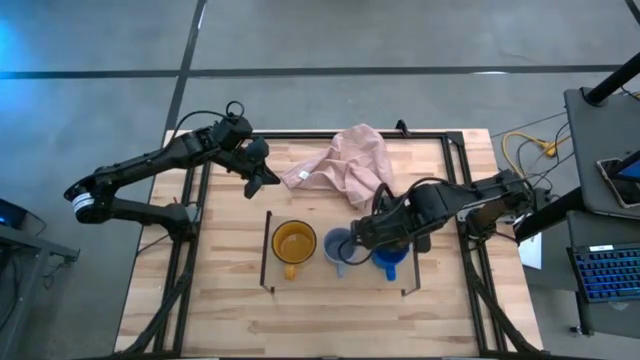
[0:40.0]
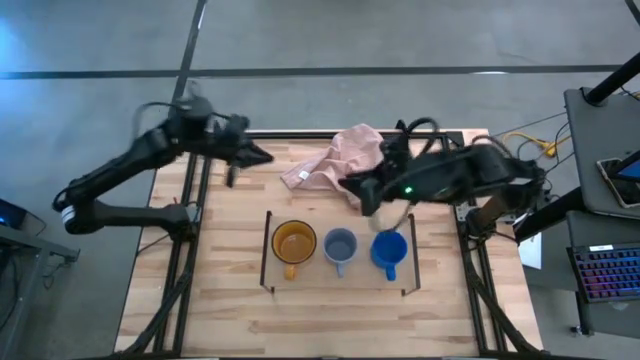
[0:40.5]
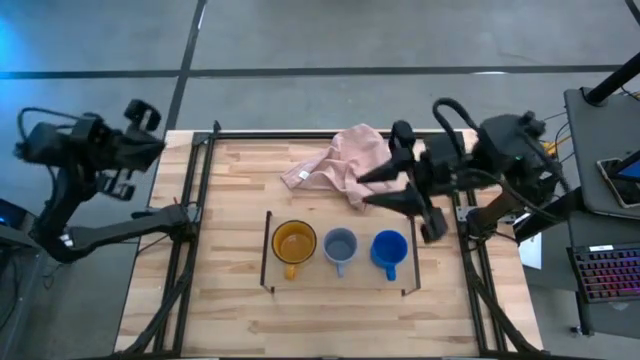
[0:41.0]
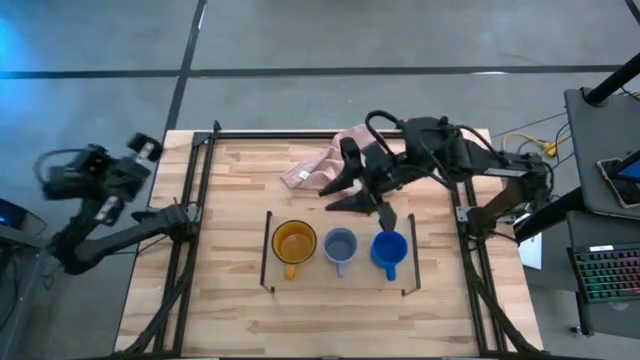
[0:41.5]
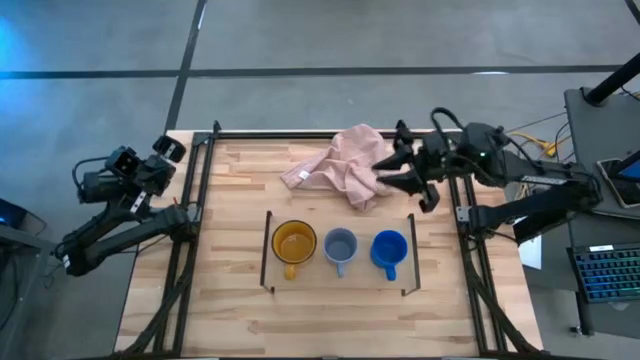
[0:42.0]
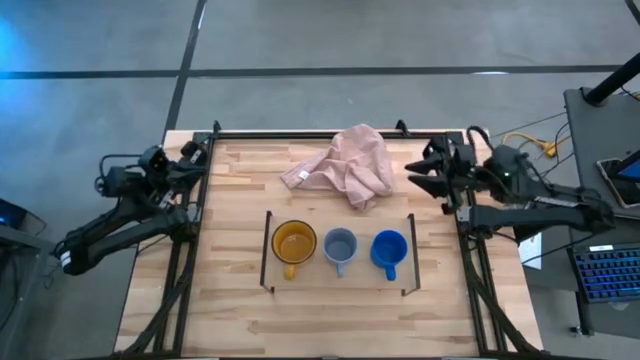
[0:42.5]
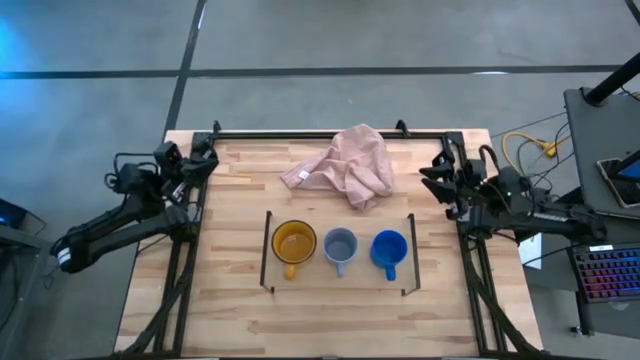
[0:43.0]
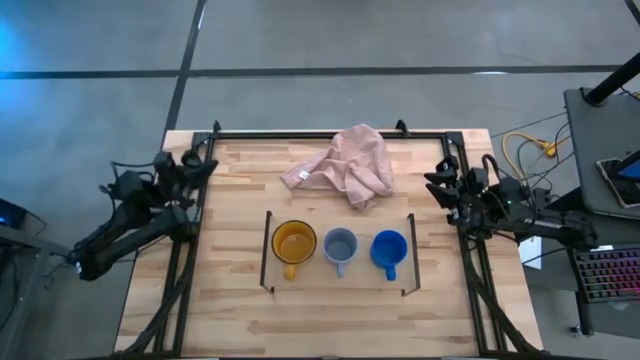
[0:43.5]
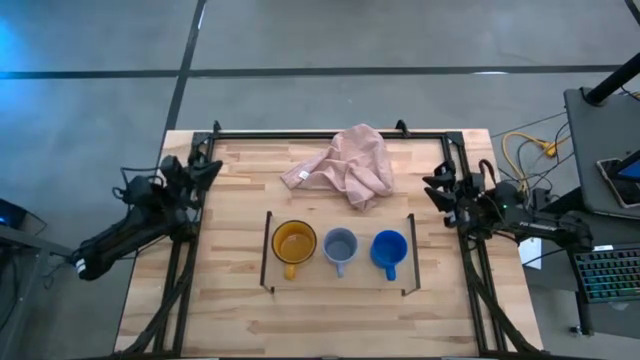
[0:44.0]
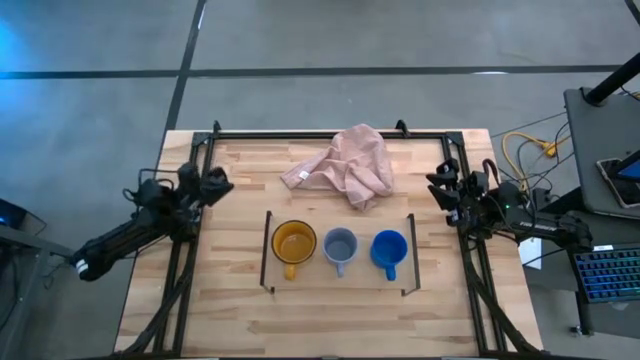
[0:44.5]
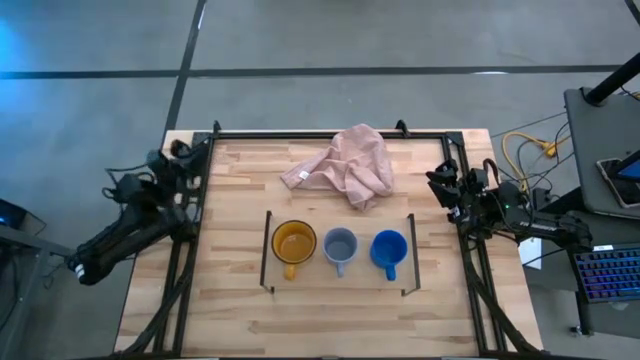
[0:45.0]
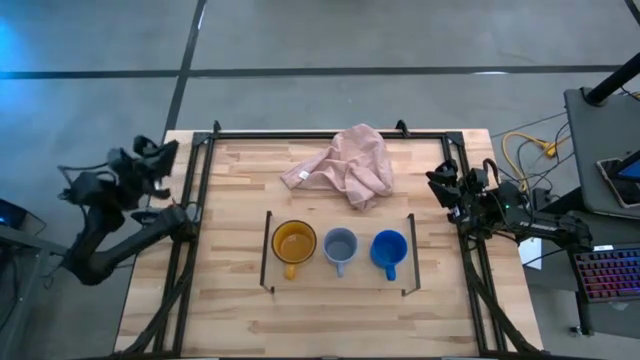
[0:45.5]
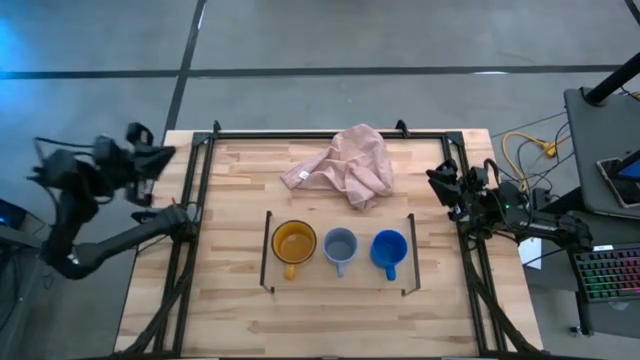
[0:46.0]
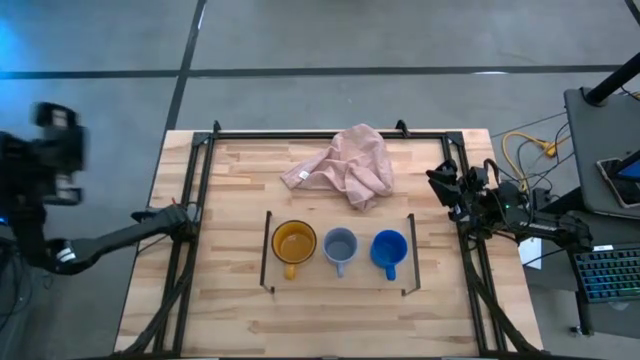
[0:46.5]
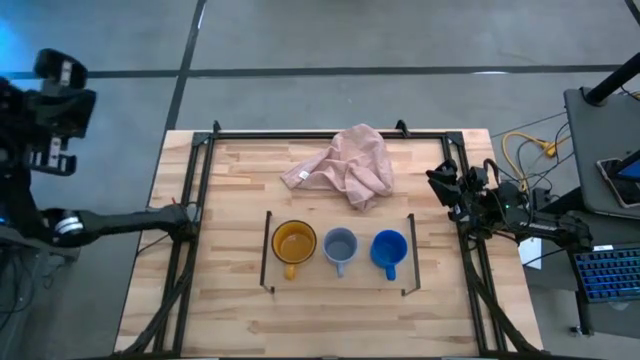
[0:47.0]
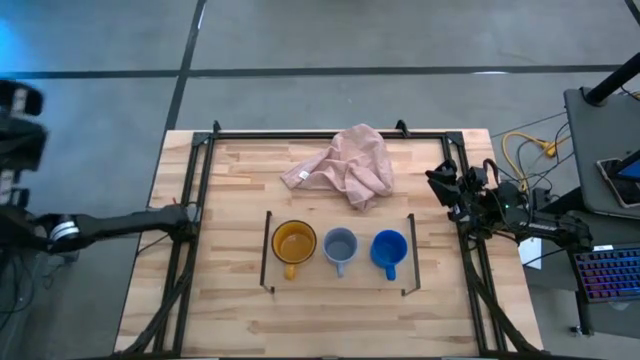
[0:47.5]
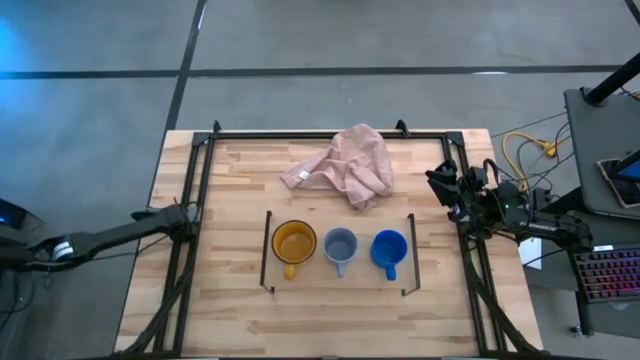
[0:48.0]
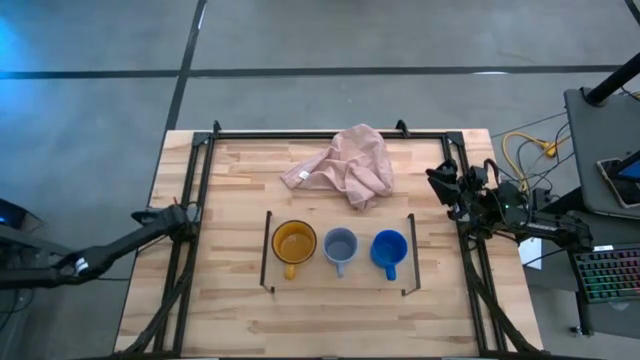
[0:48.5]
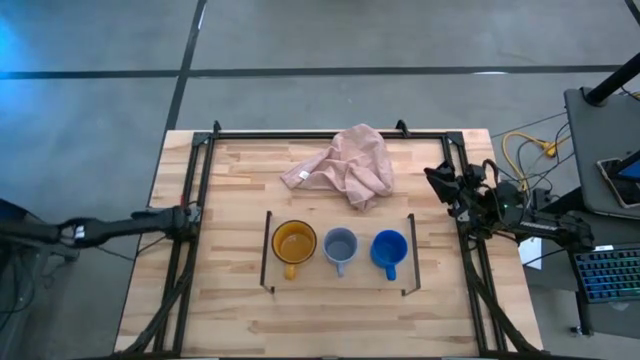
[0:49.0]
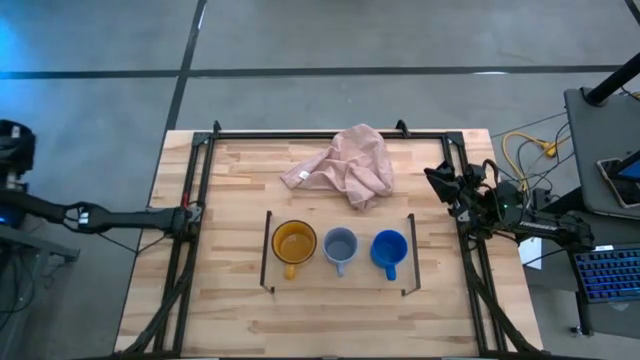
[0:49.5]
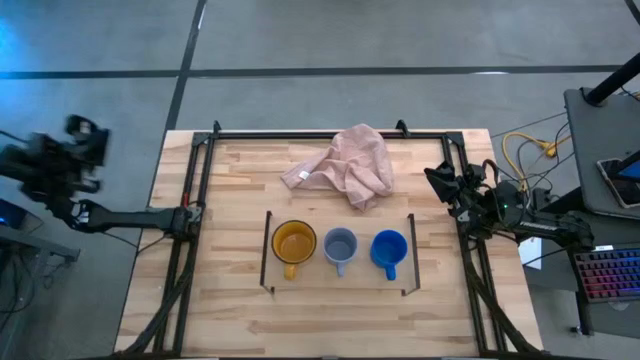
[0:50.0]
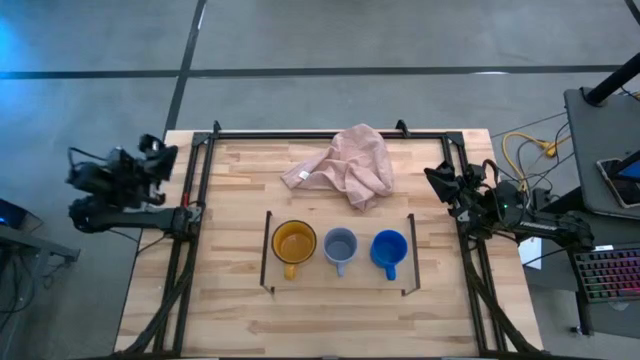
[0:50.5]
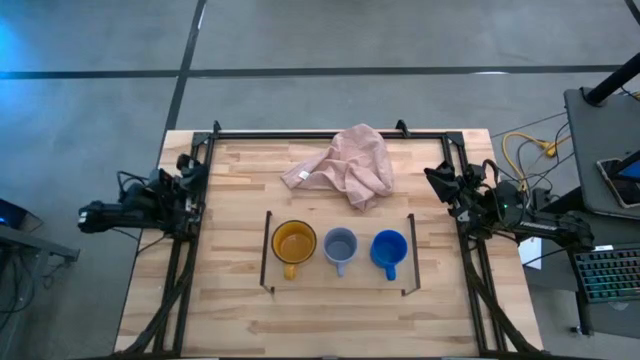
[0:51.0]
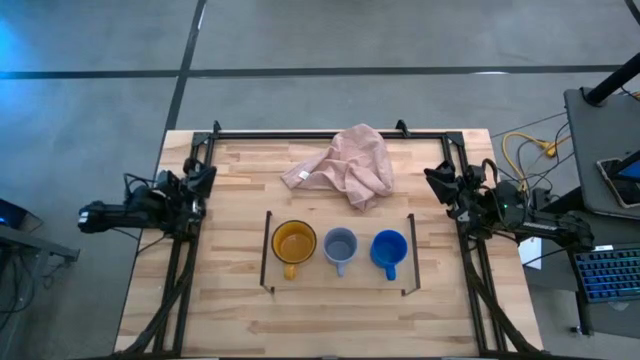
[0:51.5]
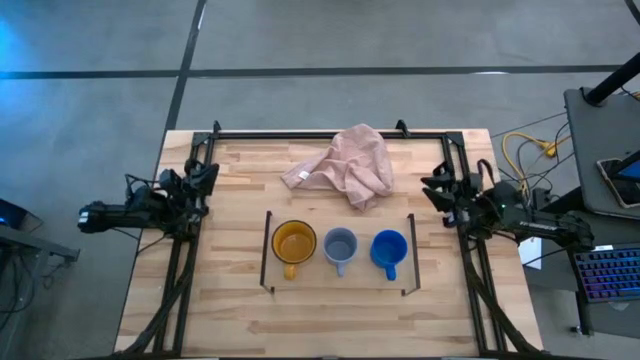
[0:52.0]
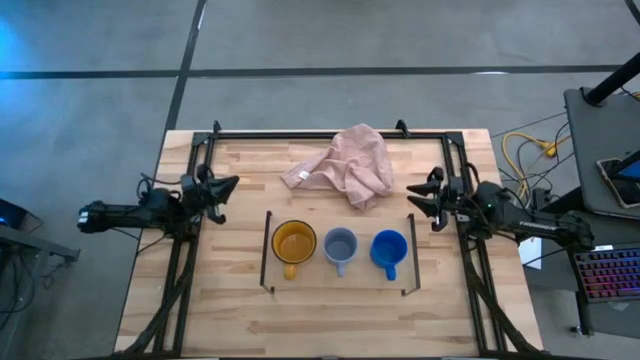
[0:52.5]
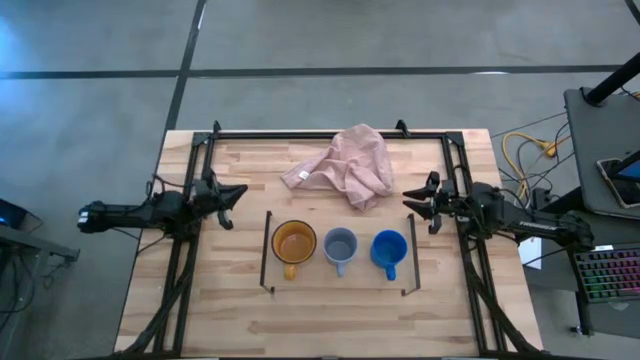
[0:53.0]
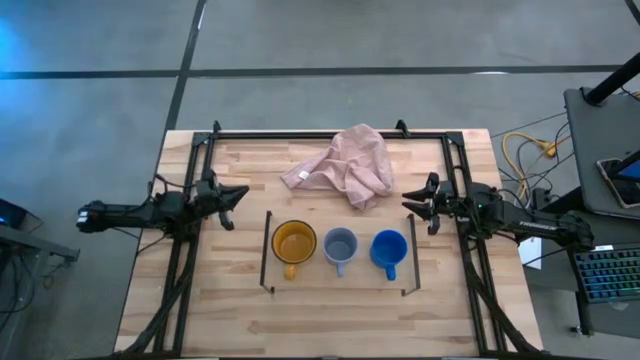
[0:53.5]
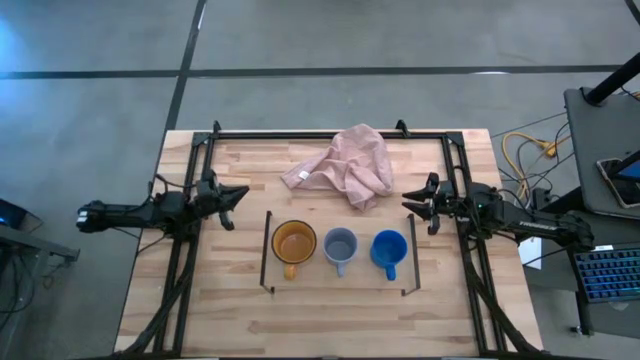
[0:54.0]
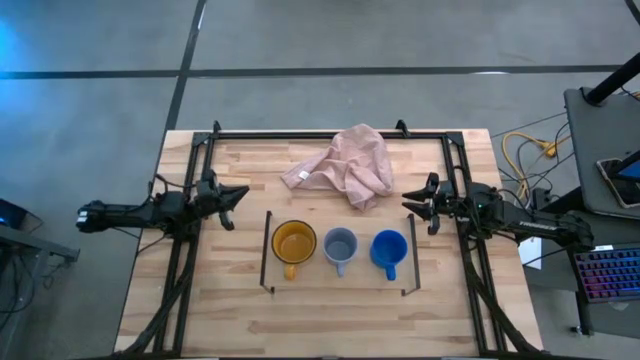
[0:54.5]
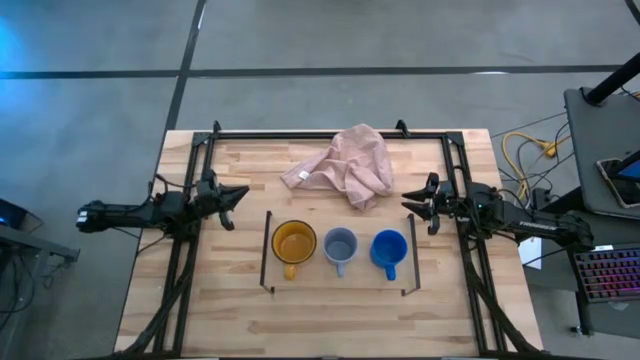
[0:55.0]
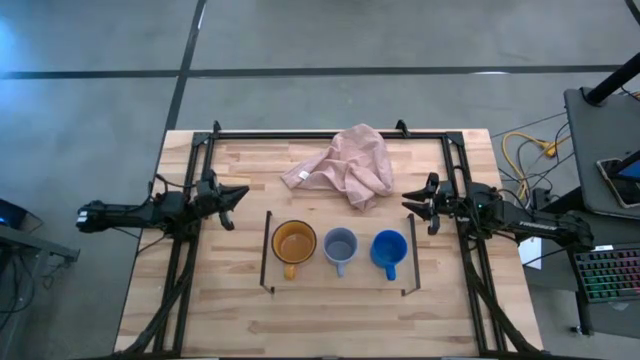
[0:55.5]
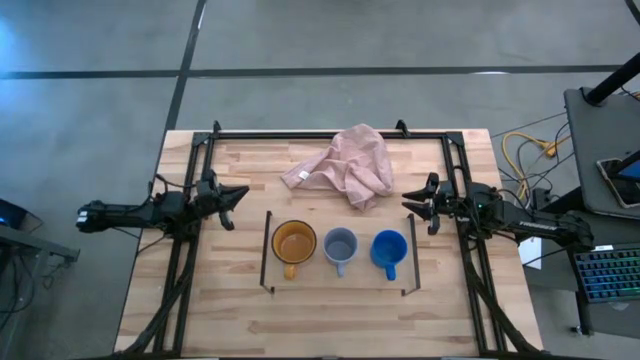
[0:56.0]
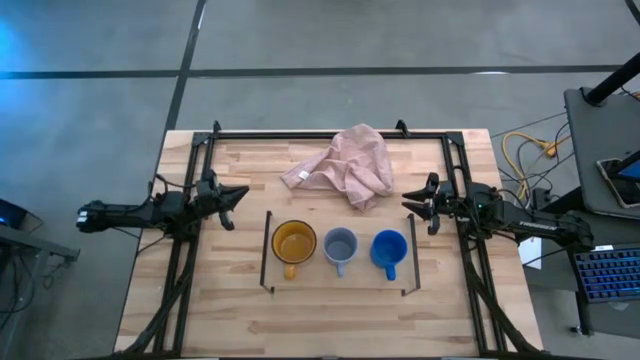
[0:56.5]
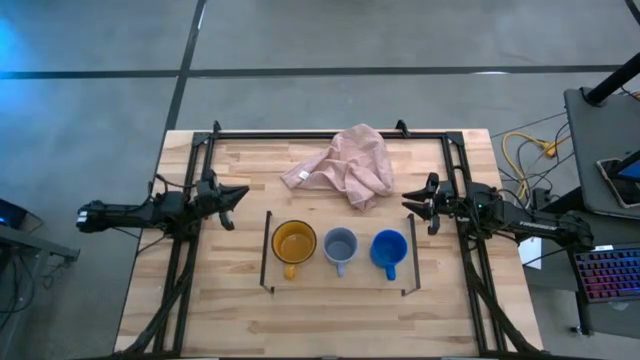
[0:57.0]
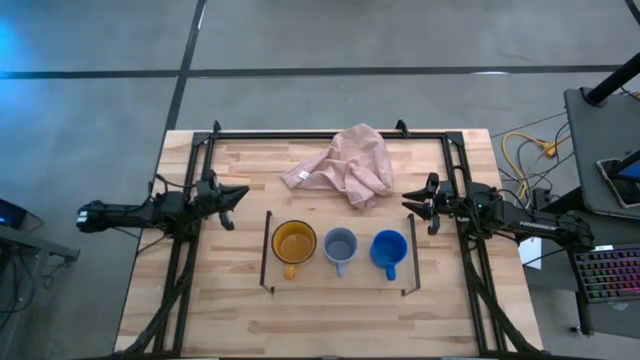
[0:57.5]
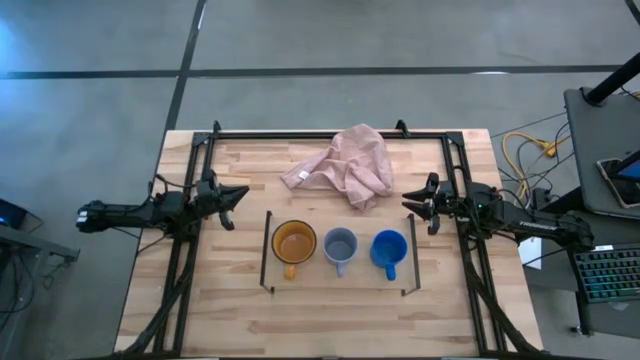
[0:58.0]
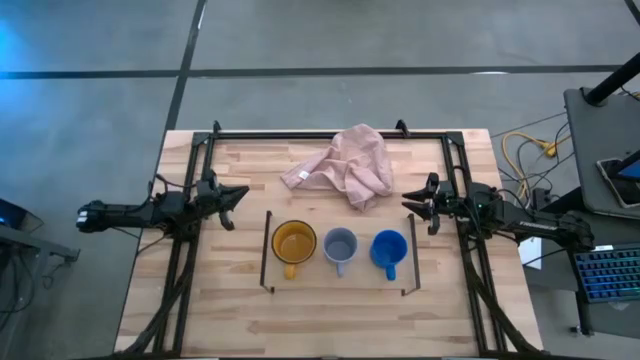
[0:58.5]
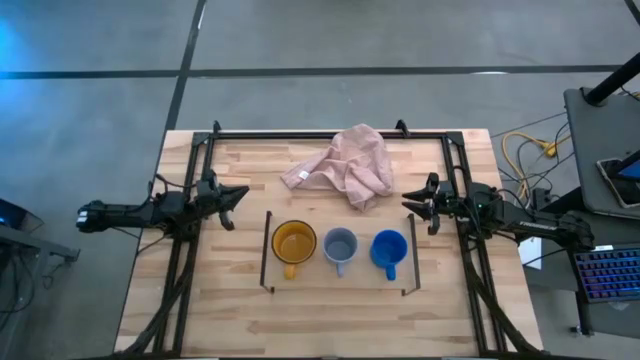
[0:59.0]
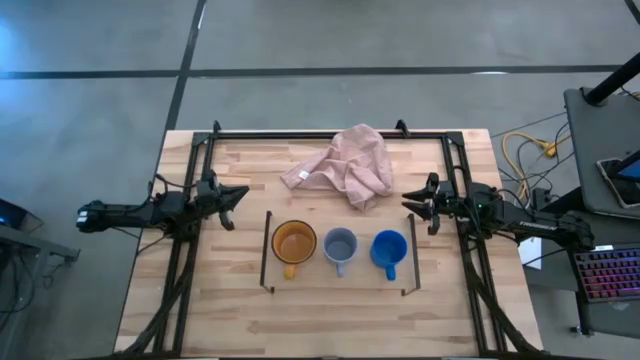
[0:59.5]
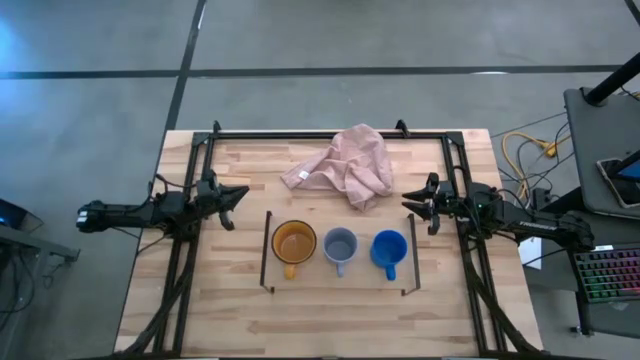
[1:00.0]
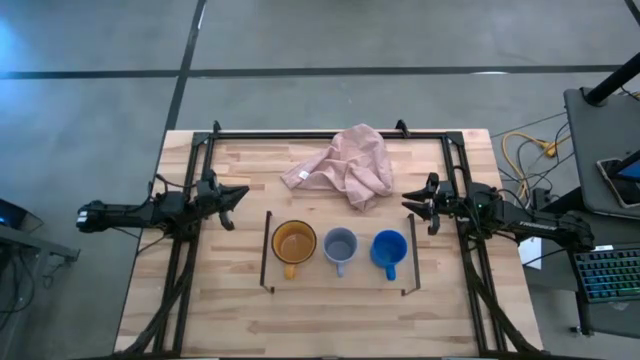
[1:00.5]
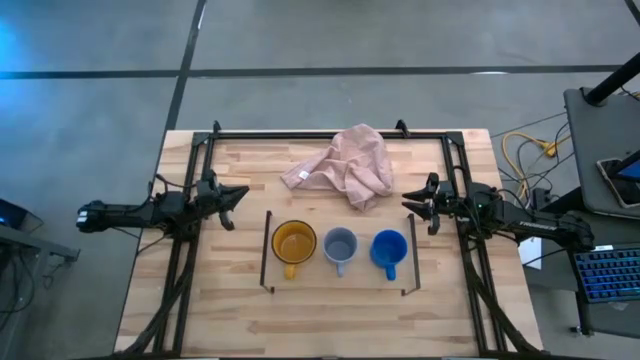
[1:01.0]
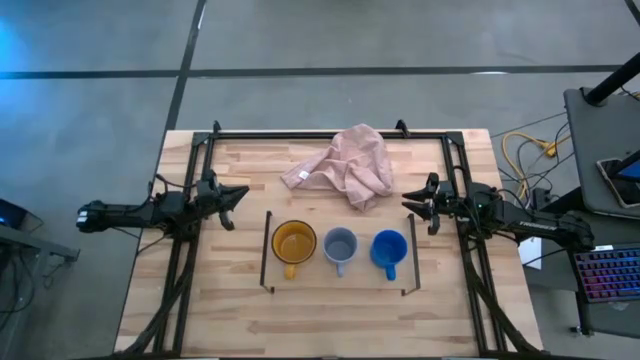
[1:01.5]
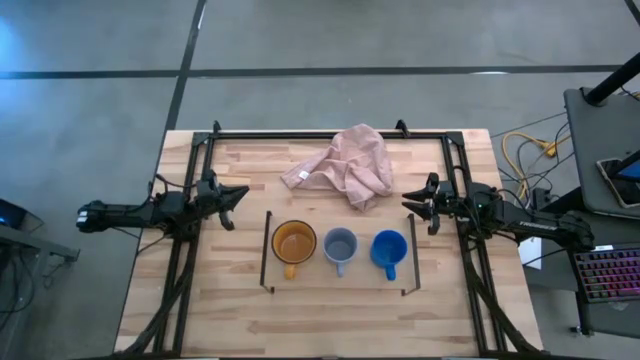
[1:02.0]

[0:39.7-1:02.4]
Task: Stack small to large cups/mugs on shelf
Return to Home Position
